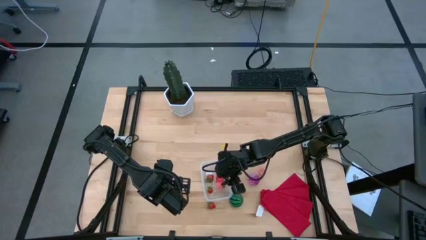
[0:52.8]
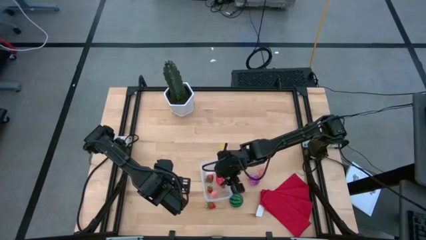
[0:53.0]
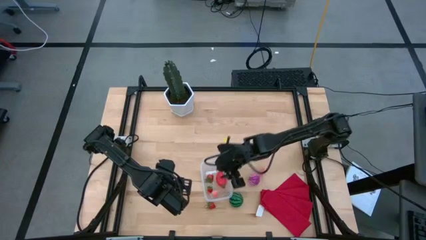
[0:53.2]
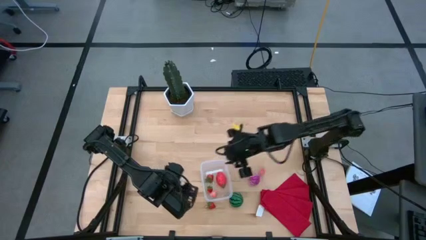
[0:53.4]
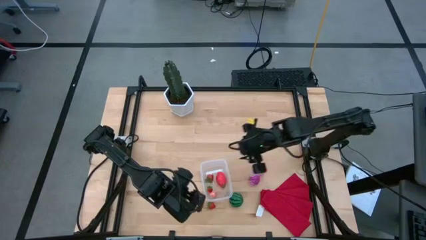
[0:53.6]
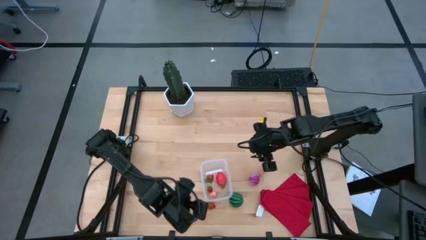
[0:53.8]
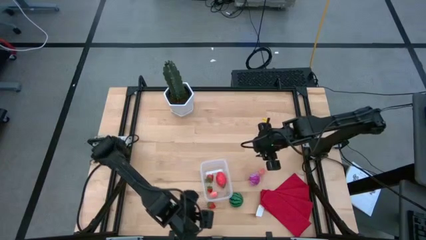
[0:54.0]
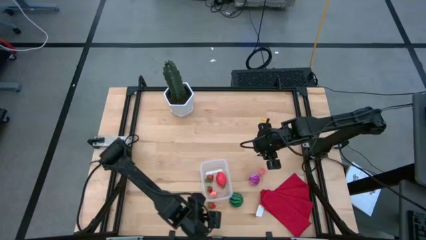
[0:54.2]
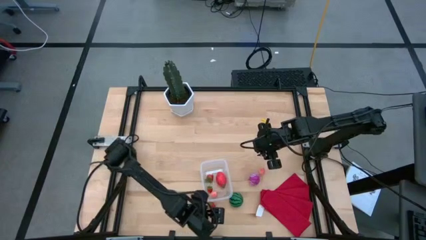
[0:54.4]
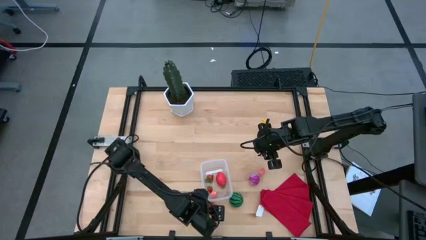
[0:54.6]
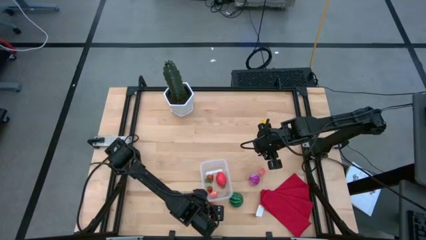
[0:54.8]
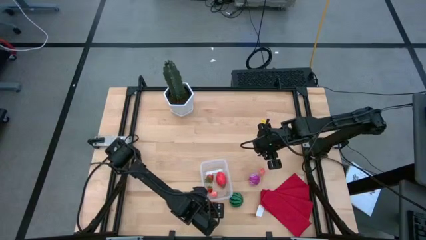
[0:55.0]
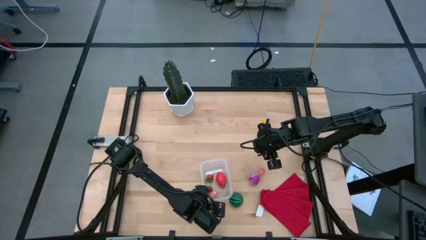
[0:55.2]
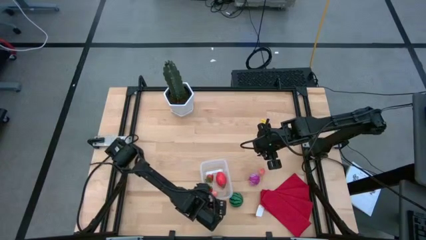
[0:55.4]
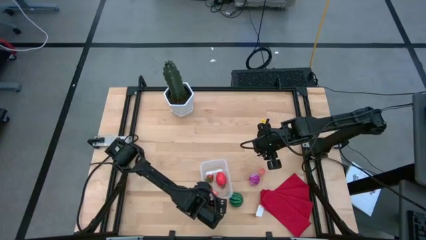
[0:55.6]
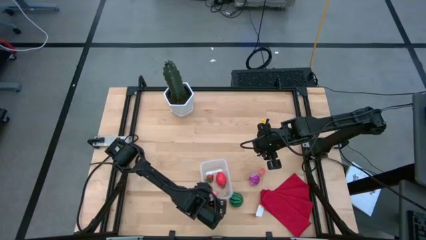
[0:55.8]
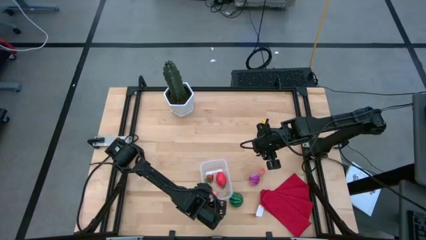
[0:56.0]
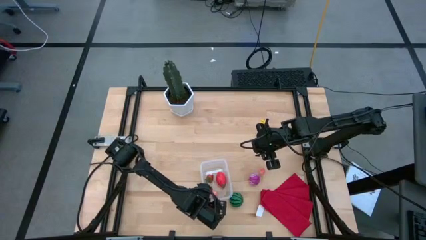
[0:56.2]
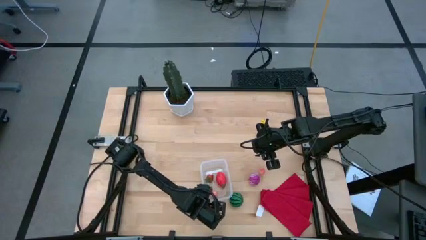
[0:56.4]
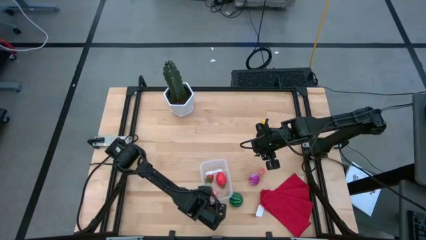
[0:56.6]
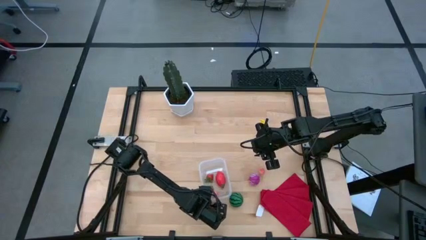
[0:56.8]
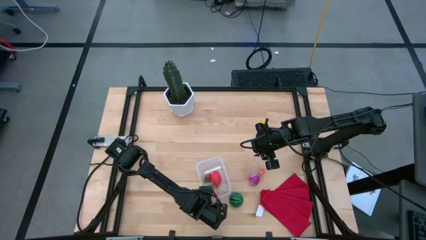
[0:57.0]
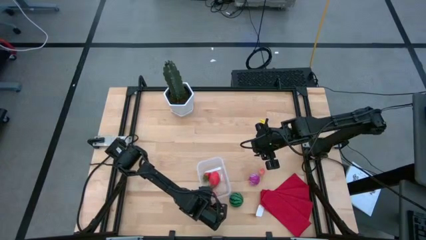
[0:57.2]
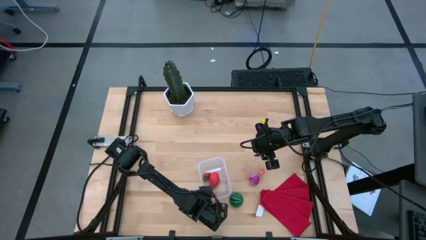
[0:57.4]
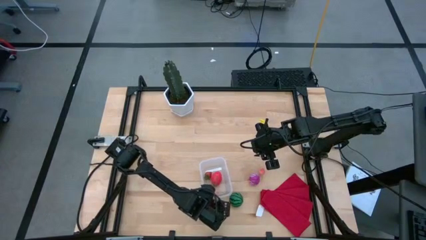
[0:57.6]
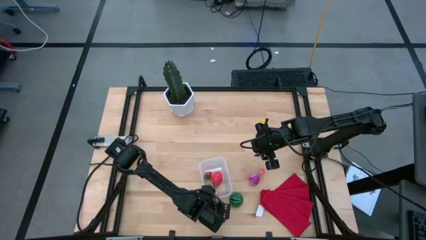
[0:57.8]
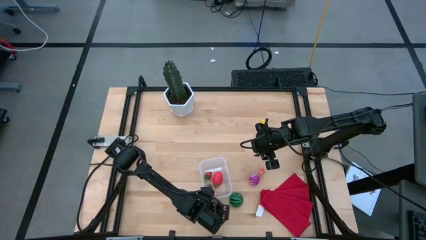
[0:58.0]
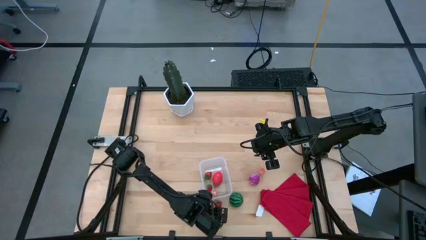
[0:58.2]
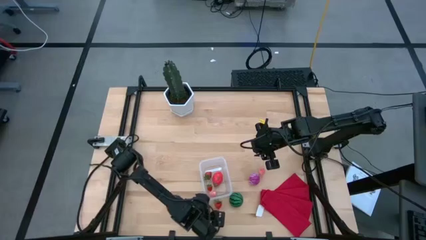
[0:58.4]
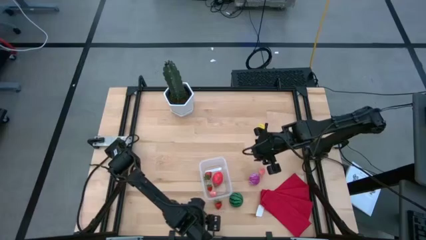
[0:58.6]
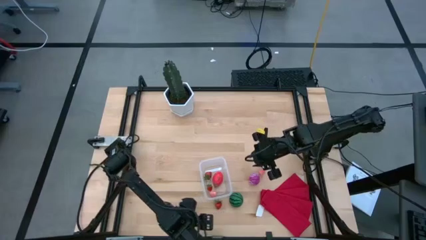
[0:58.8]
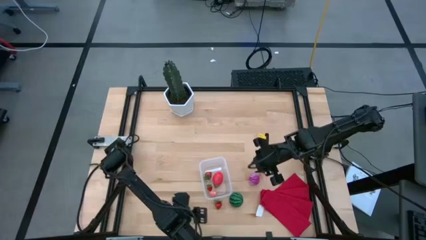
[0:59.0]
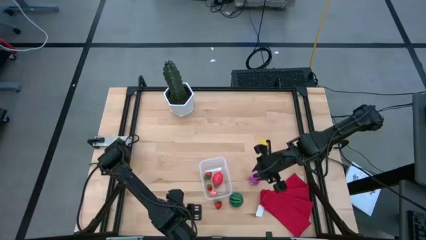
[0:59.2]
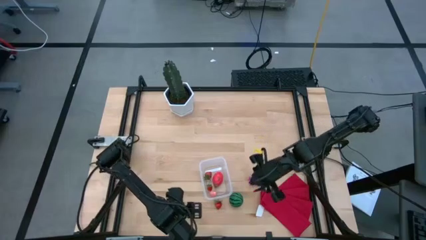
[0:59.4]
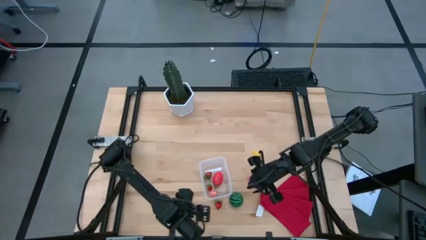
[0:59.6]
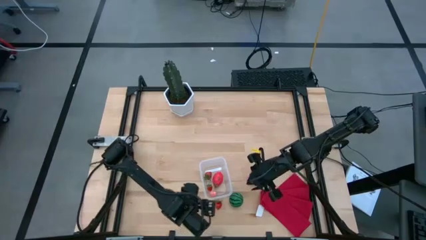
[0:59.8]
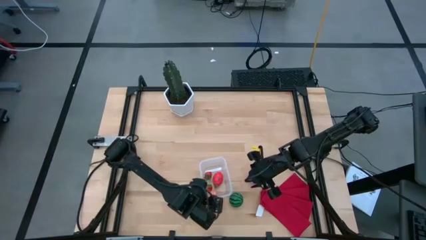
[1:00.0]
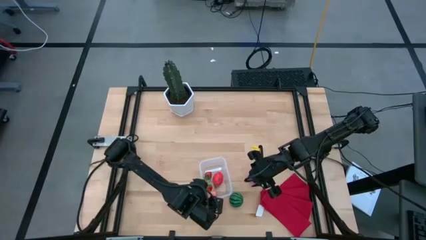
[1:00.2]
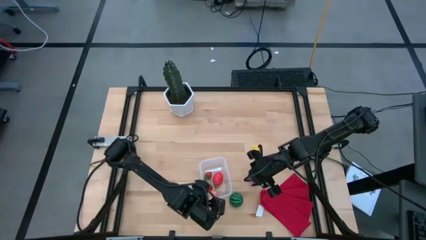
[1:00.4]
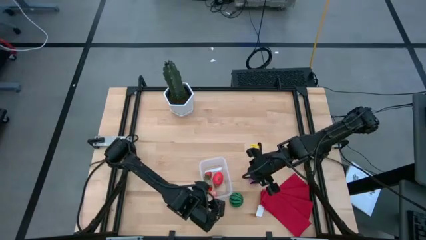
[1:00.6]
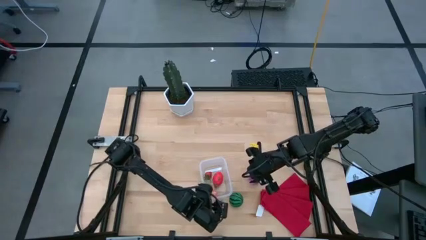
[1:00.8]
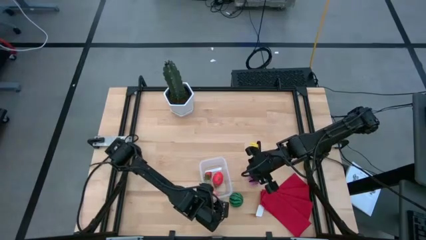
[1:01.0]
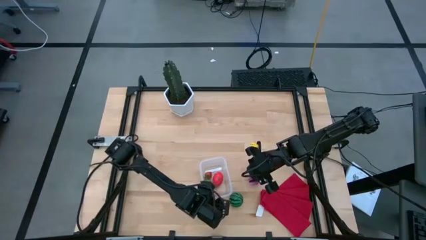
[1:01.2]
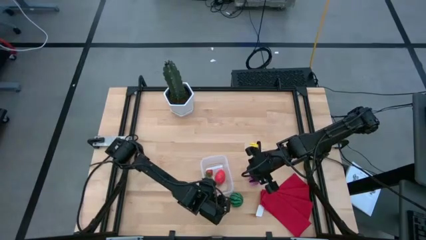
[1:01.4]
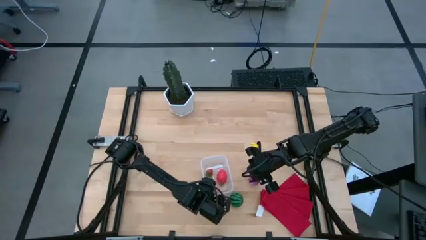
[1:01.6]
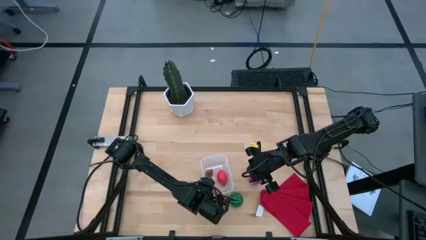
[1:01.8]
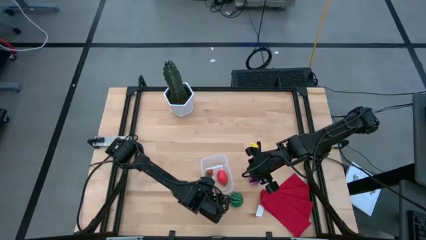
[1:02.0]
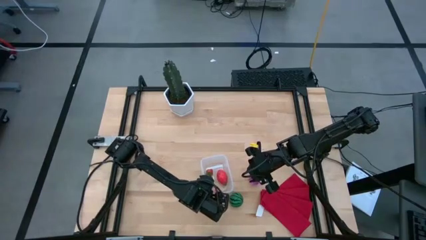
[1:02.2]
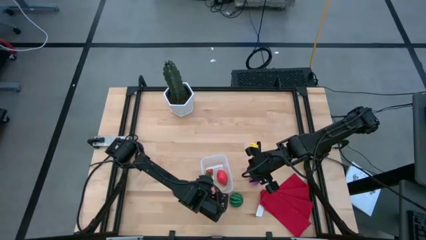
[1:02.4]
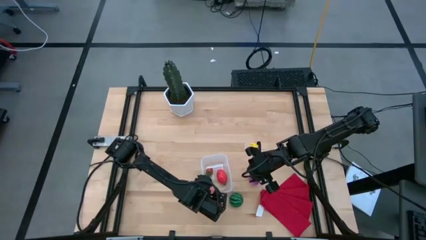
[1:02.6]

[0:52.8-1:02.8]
Task: Pick and placing Produce into tupperware
Put the strawberry into the transparent white bin

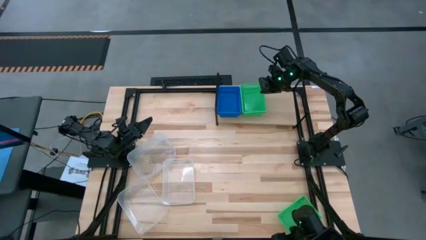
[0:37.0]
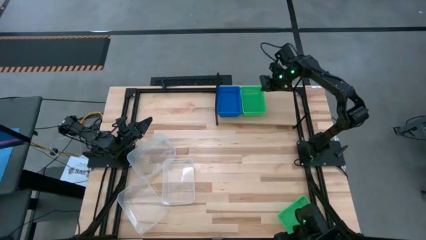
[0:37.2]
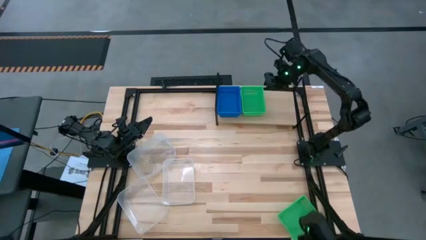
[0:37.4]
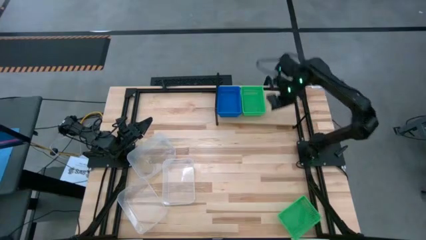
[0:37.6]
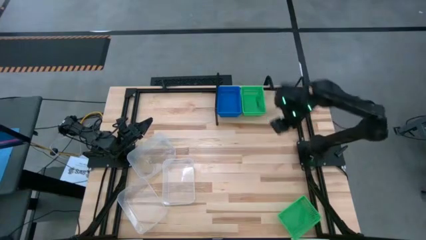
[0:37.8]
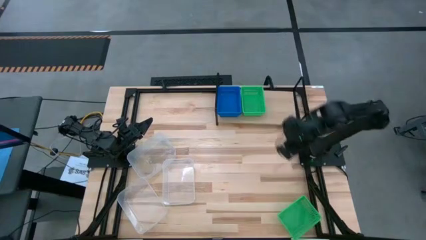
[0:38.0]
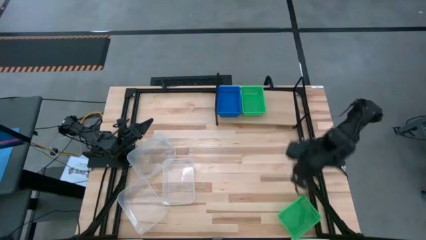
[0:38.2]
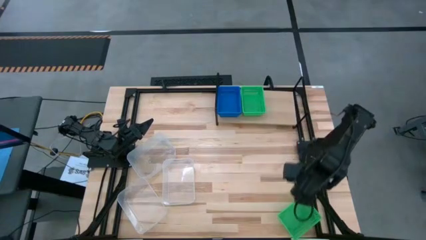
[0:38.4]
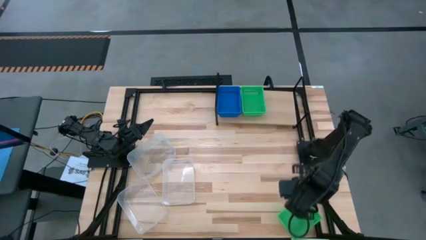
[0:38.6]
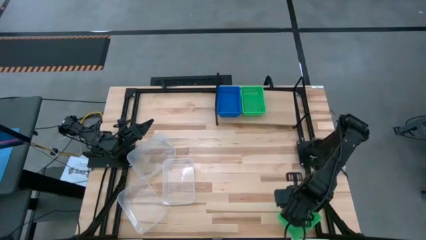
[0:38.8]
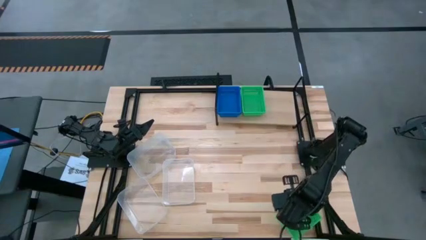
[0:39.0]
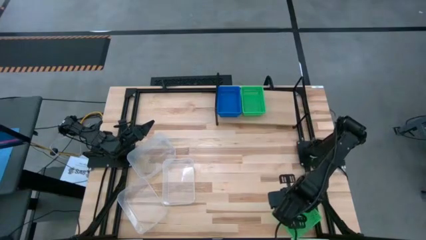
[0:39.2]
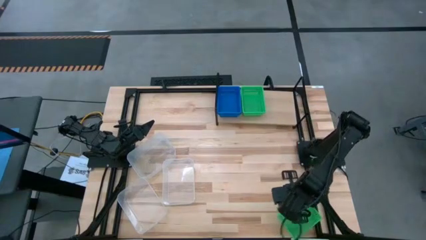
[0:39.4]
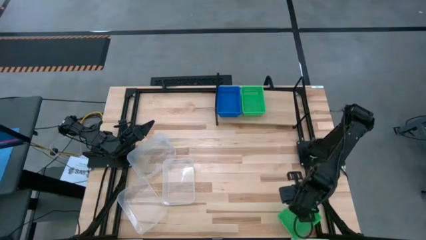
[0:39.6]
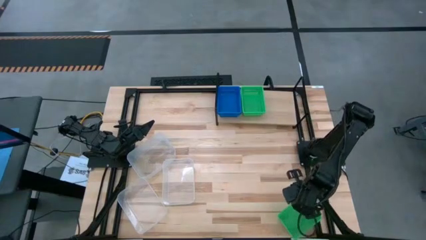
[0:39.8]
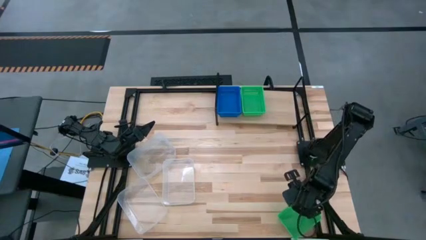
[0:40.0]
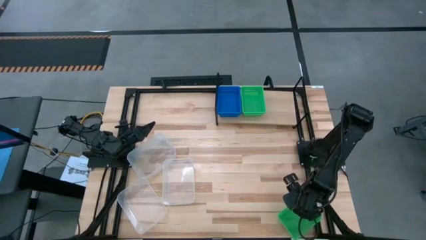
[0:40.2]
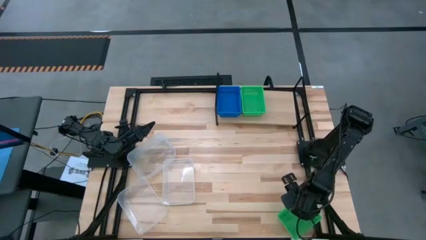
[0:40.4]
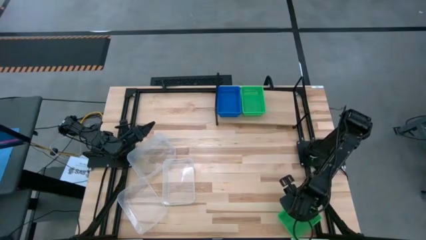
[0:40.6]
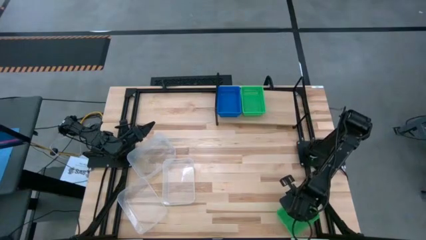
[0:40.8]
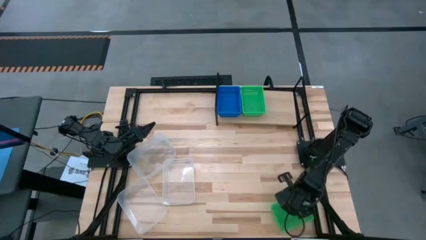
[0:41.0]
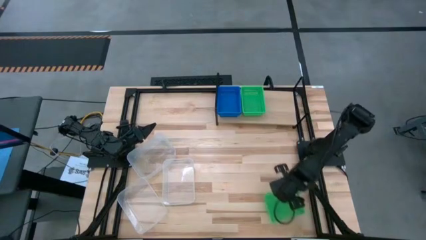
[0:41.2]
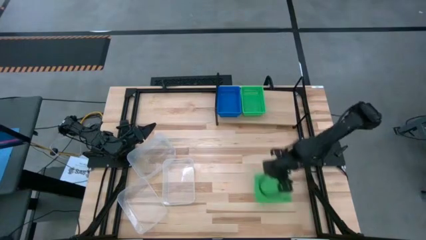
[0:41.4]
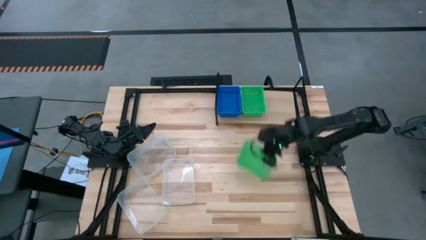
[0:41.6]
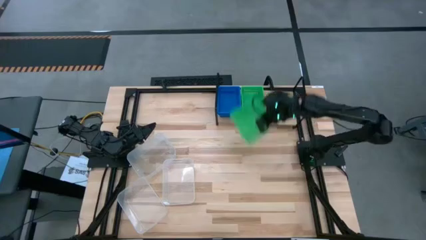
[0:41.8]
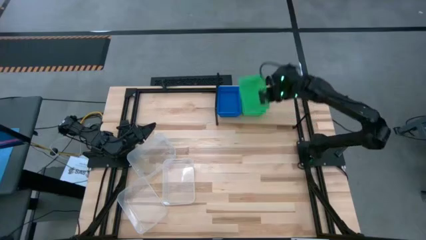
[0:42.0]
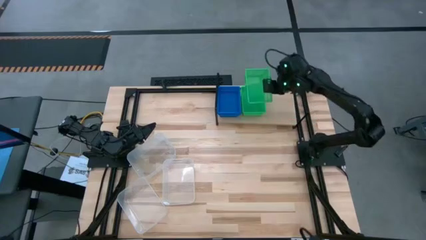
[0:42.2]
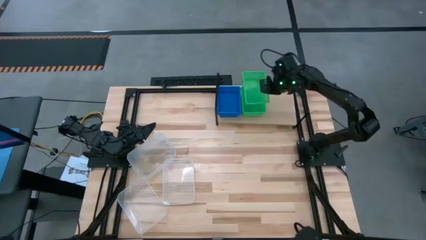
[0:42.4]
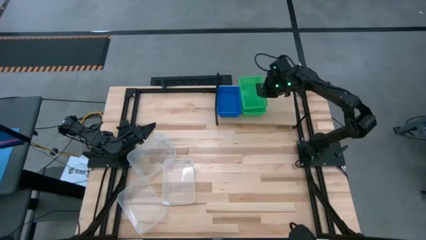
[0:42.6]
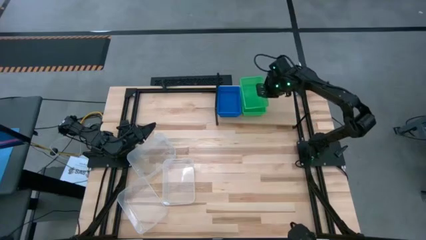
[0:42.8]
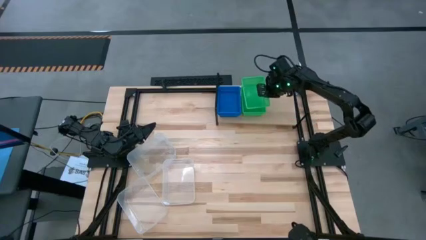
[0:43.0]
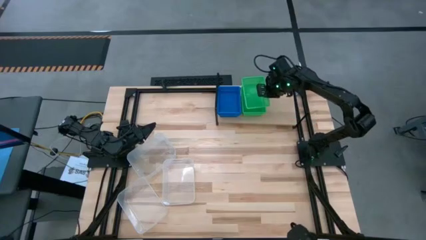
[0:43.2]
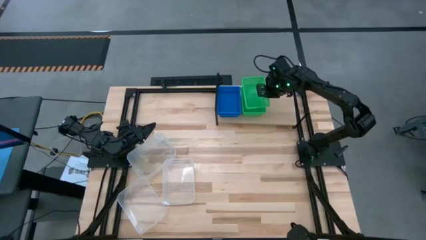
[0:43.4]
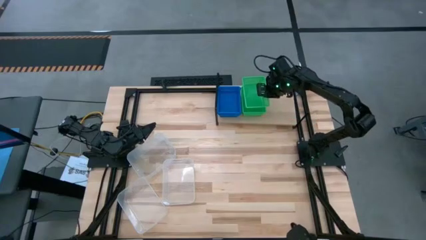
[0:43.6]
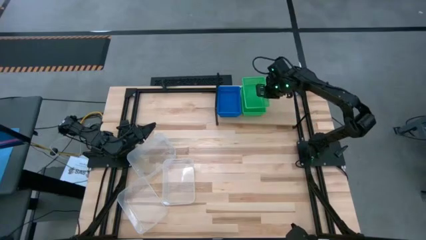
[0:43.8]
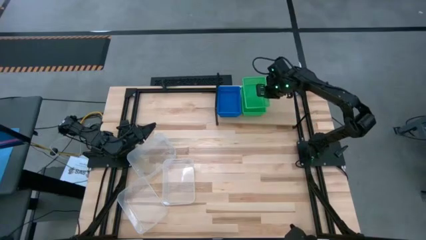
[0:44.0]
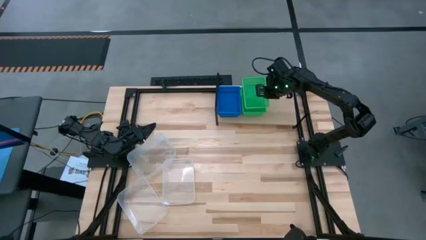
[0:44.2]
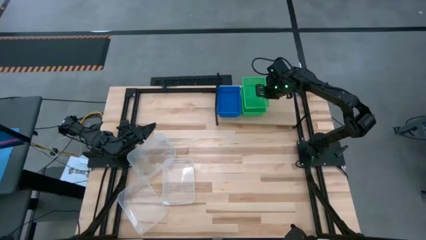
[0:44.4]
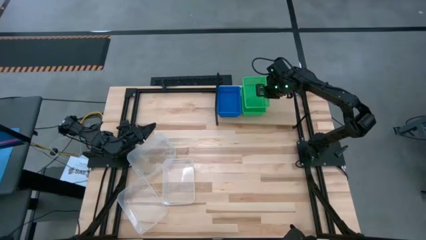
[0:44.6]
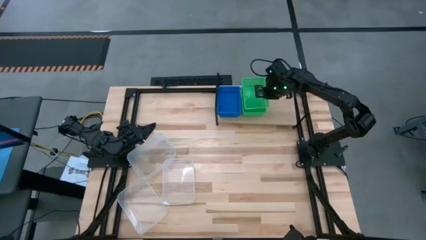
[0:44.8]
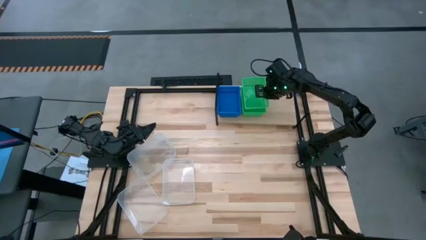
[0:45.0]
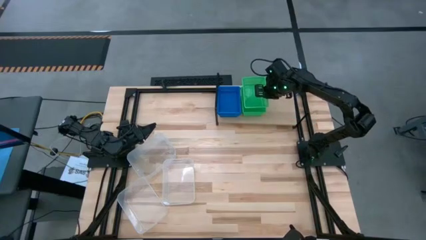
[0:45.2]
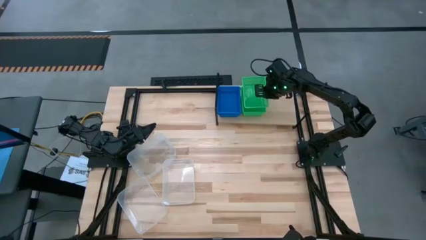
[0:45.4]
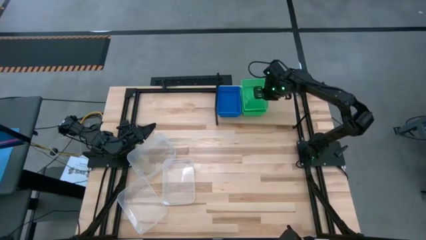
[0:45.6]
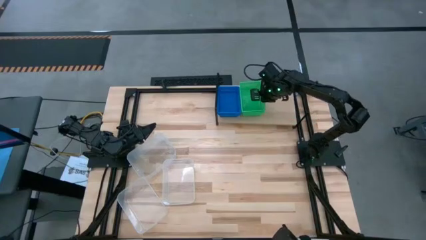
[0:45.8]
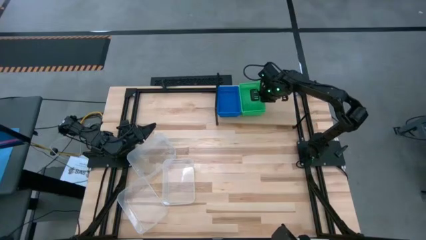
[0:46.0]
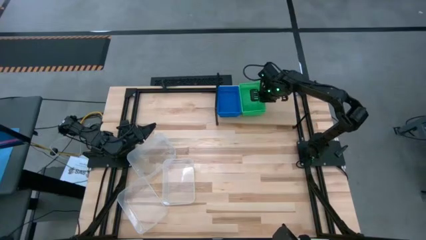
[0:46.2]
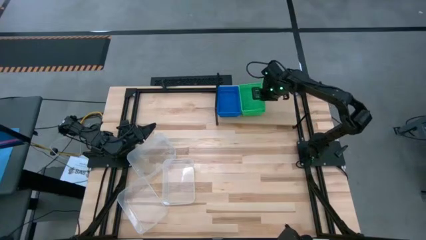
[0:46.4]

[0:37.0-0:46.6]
Task: Stack baskets on shelf by color
Stack the green bin on top of the green bins on the shelf
